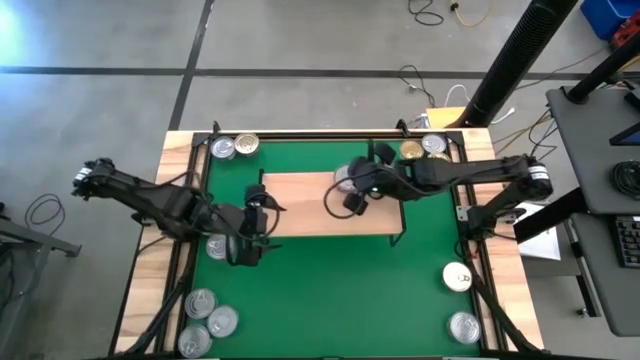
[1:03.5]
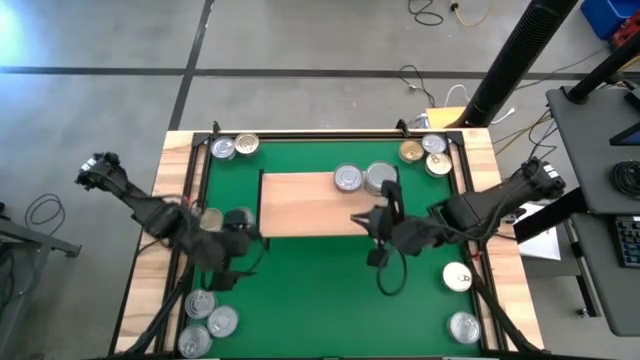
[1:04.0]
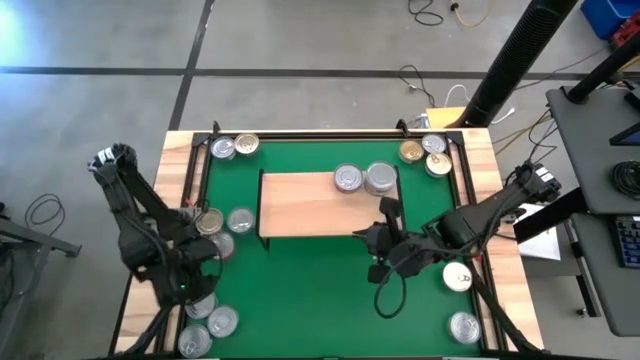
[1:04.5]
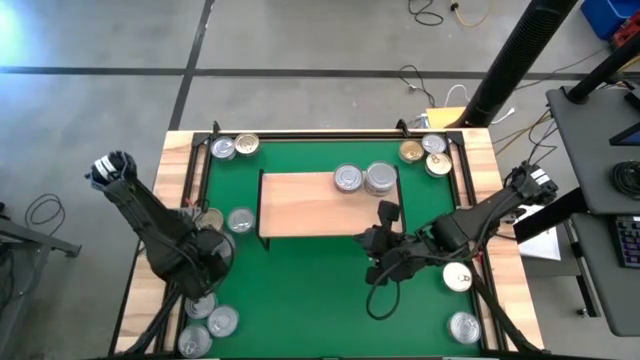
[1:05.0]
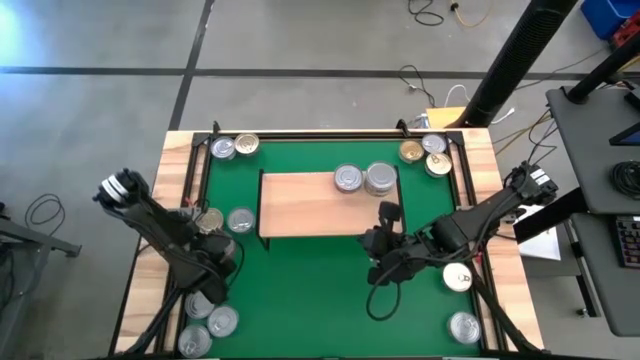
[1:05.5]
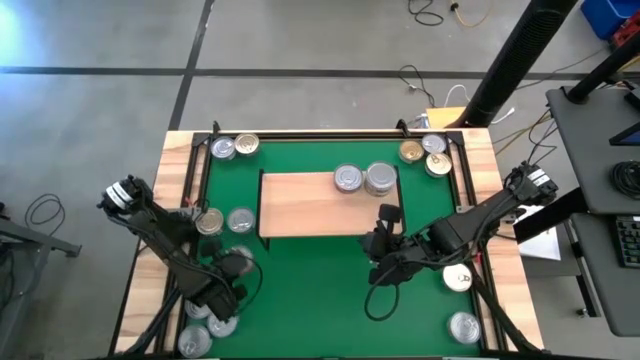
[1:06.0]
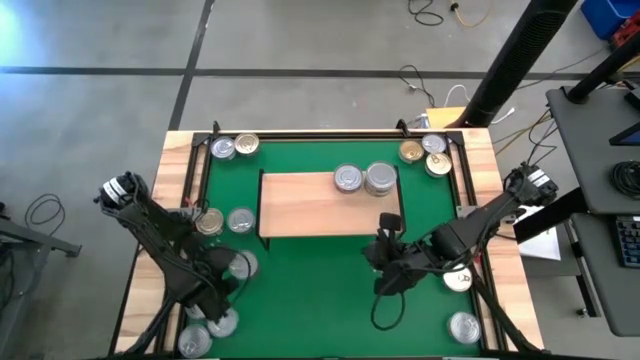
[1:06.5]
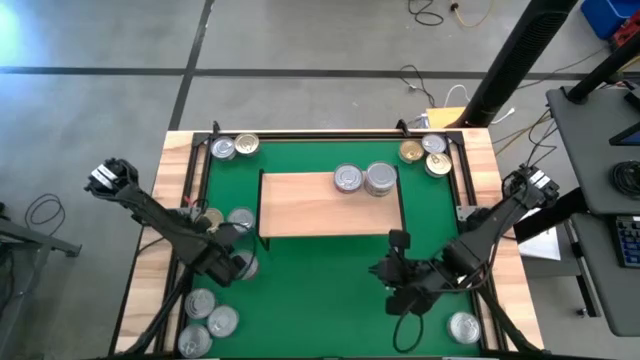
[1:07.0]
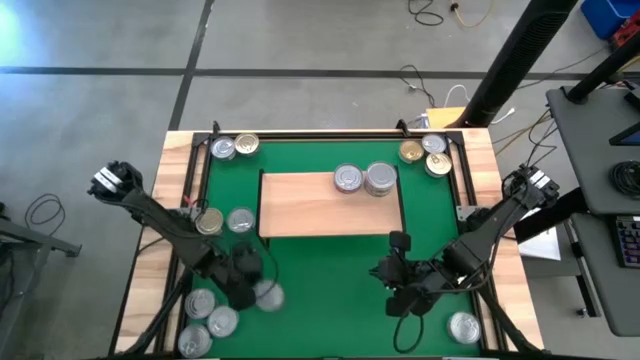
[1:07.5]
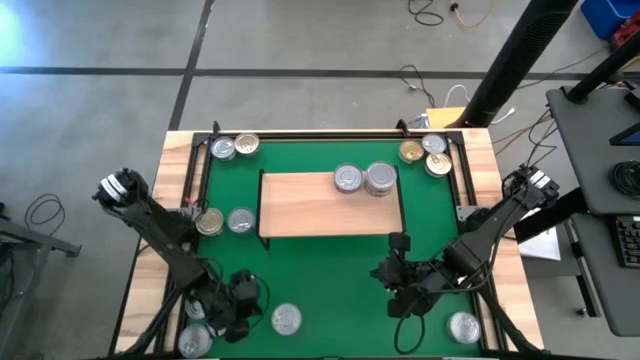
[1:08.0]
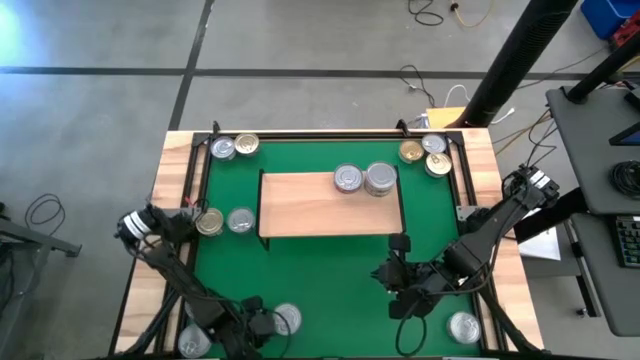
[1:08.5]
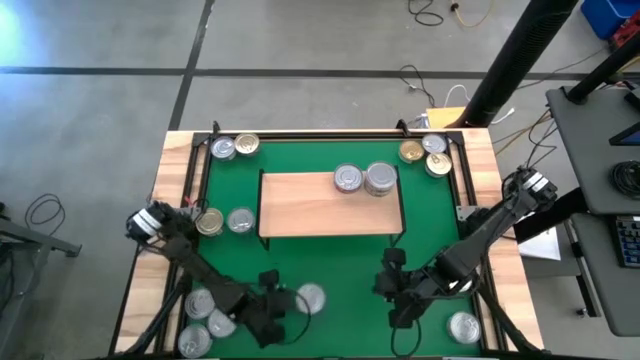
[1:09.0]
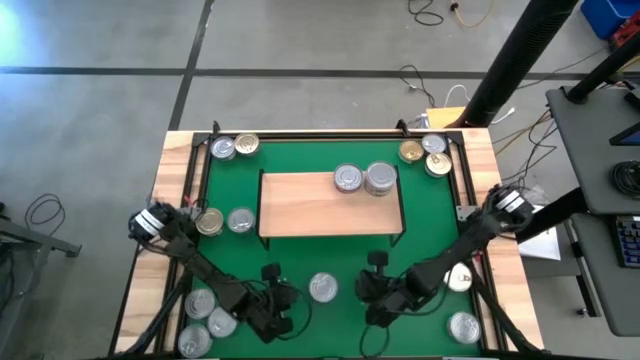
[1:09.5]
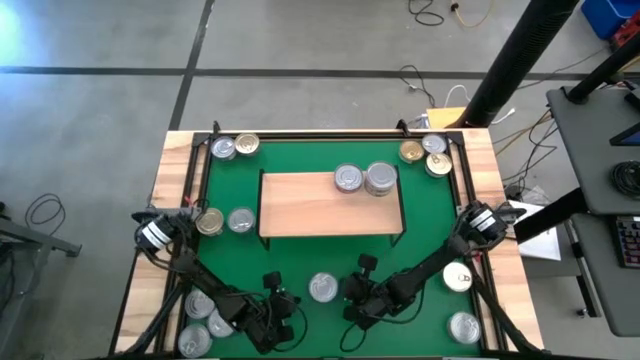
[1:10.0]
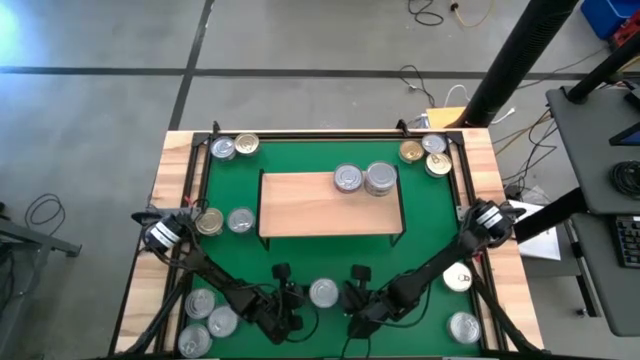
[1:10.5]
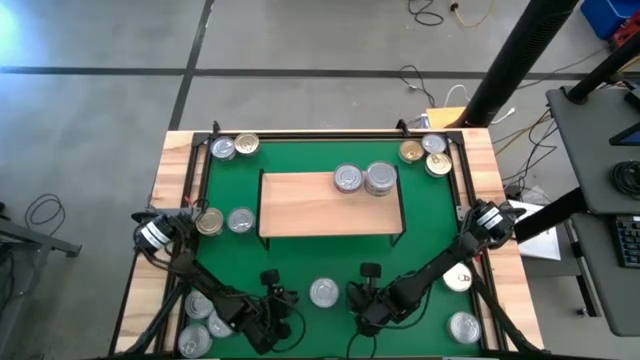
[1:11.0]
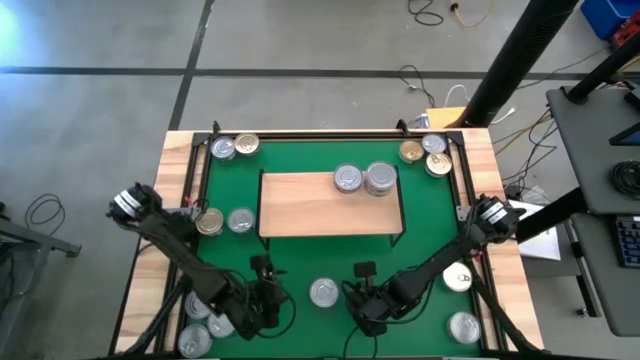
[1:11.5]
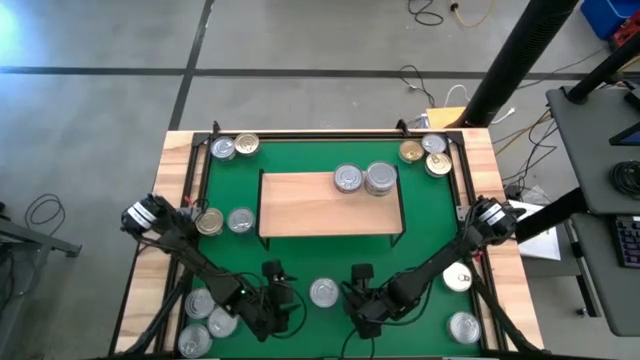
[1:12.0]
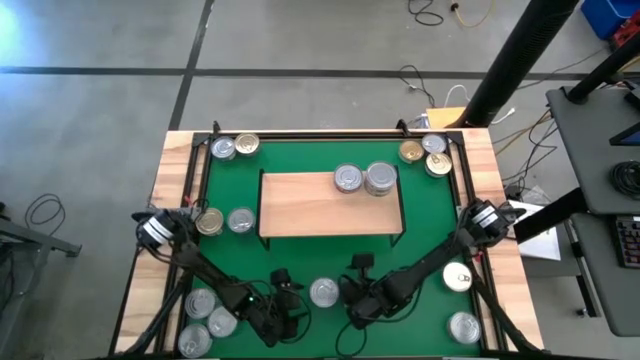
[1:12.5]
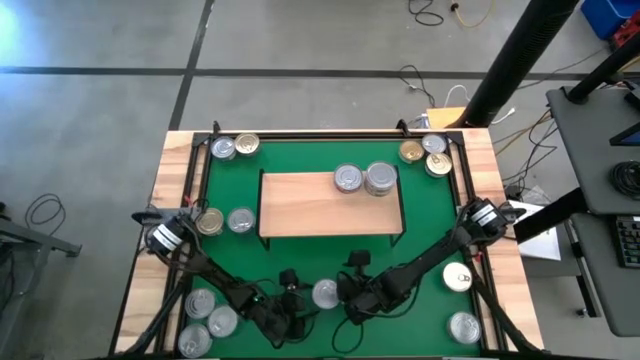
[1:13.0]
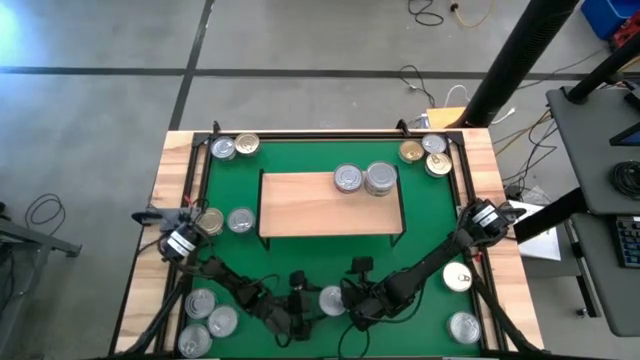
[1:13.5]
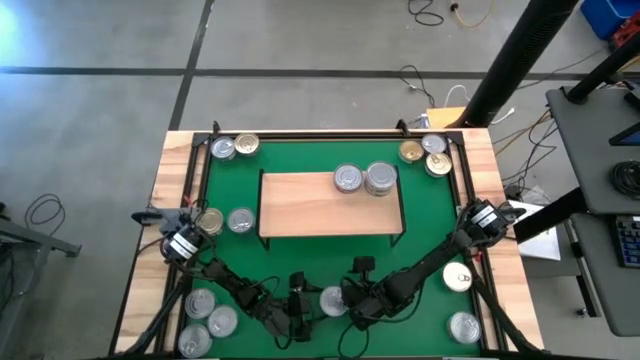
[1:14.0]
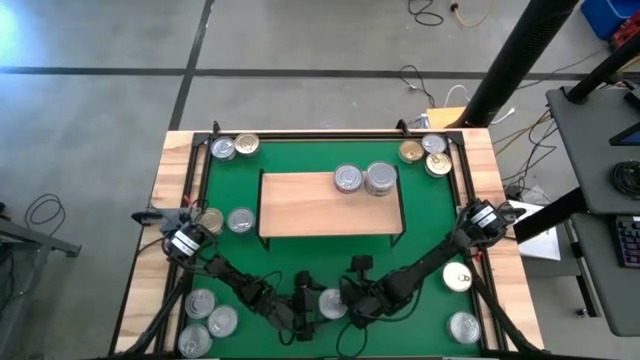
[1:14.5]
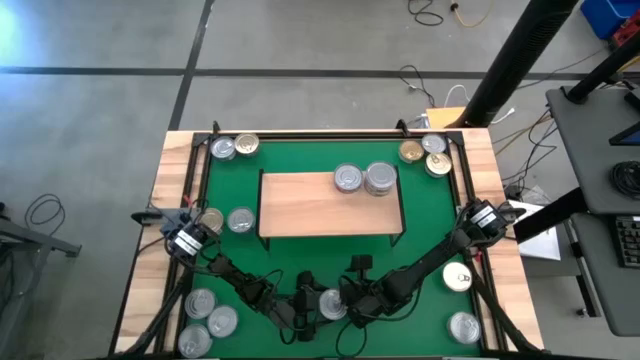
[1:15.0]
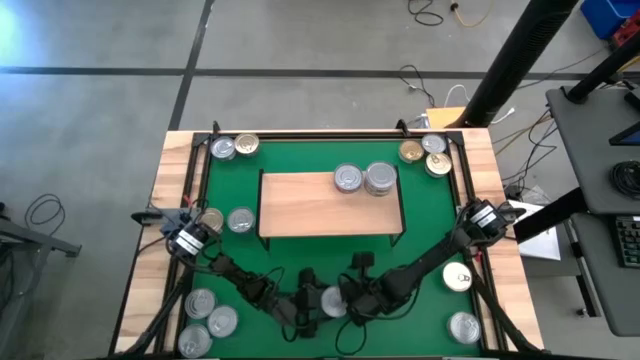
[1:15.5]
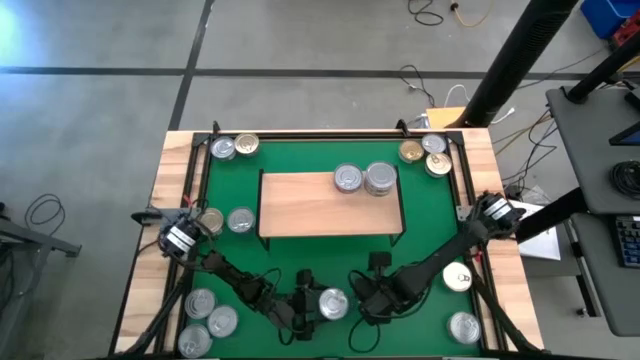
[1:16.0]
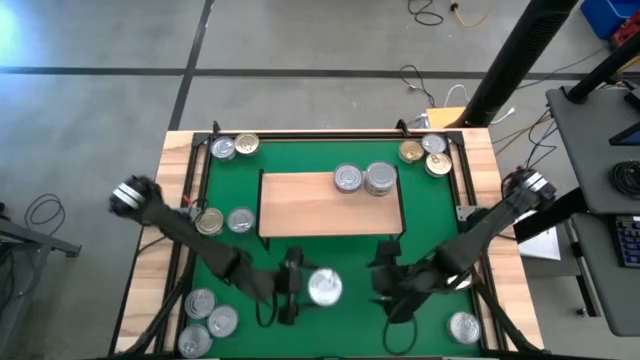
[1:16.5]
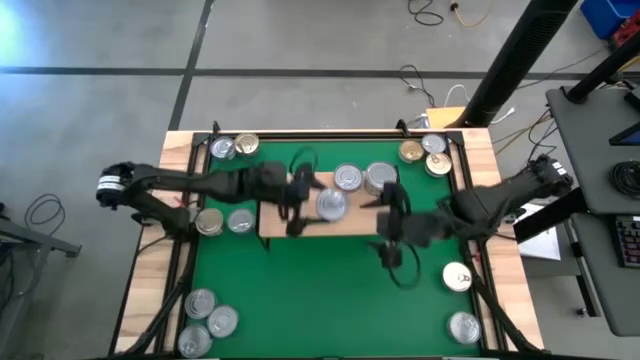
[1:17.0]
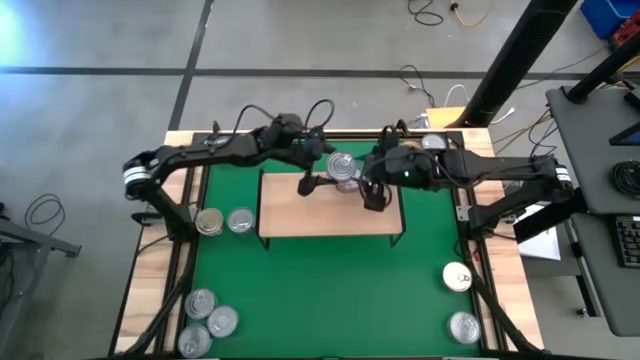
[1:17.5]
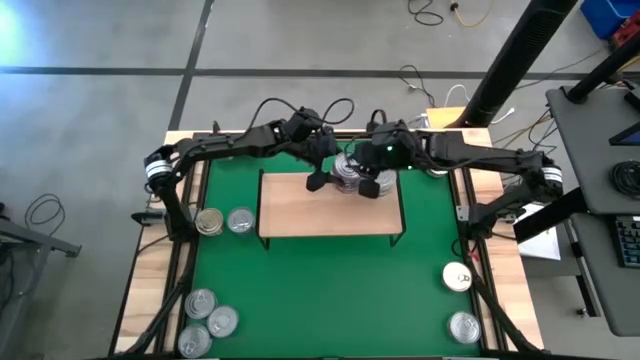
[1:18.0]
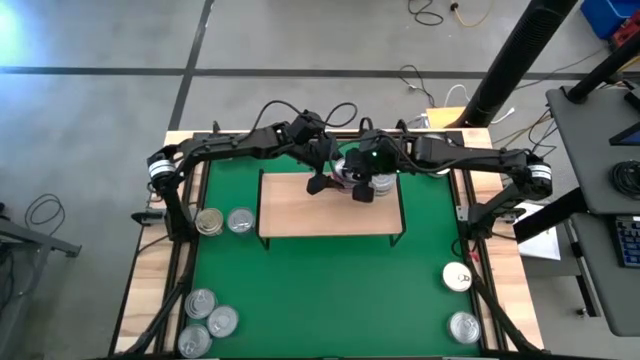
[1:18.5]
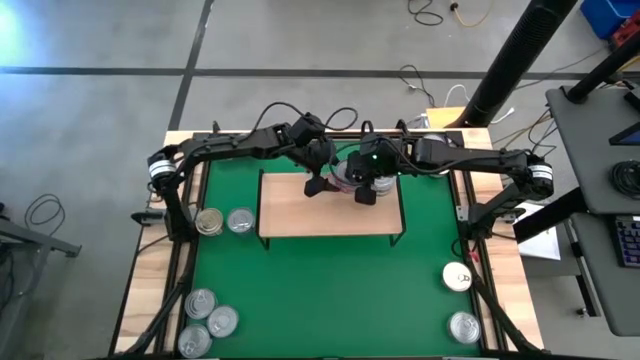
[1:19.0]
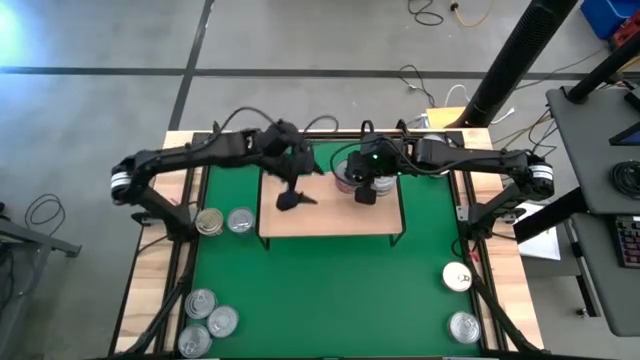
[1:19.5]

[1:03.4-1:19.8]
Task: Stack canned seafood by type on shelf
Stack the red tuna can on top of the red tuna can on the shelf
